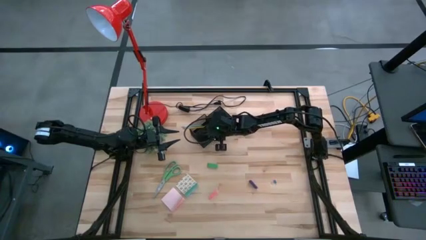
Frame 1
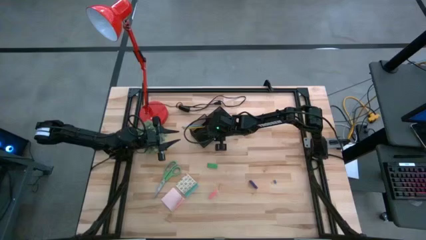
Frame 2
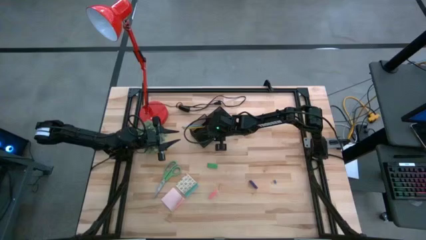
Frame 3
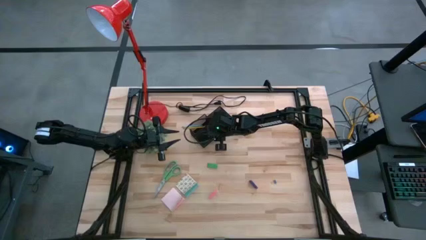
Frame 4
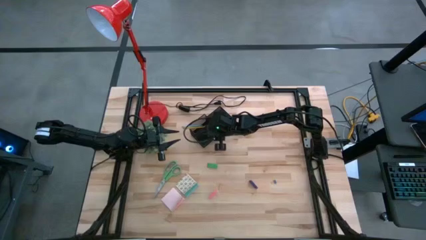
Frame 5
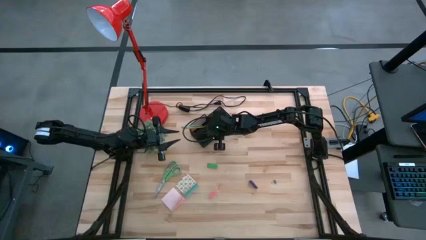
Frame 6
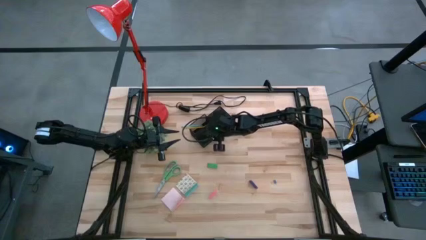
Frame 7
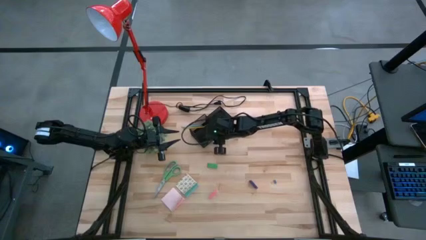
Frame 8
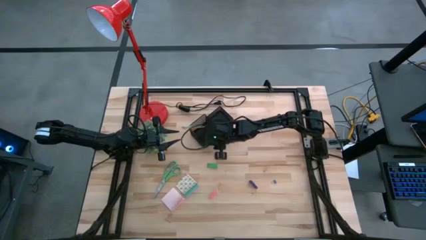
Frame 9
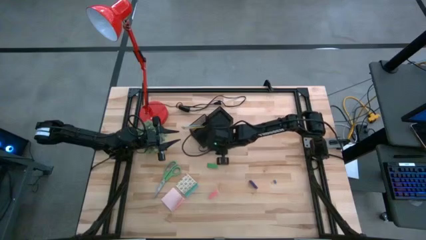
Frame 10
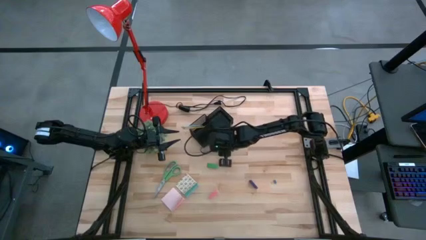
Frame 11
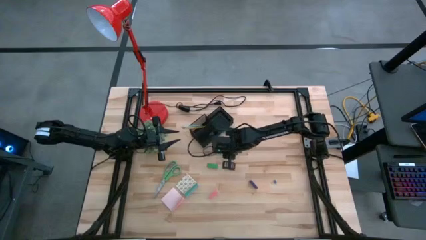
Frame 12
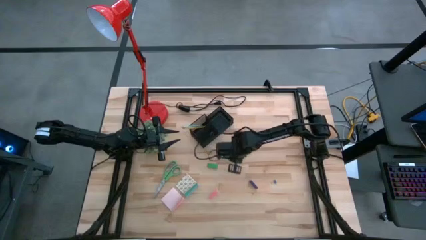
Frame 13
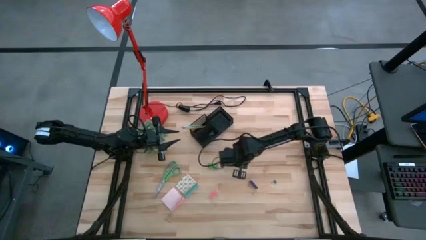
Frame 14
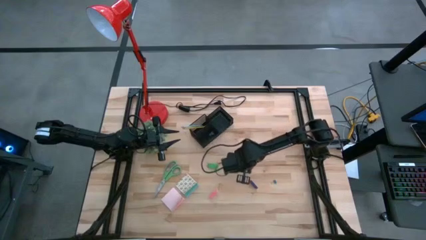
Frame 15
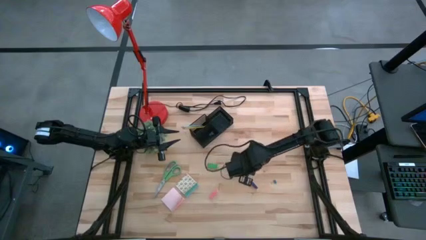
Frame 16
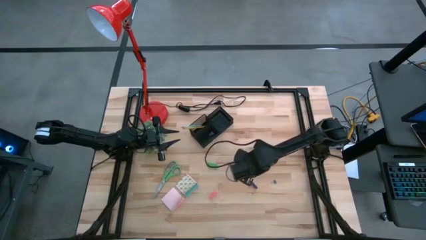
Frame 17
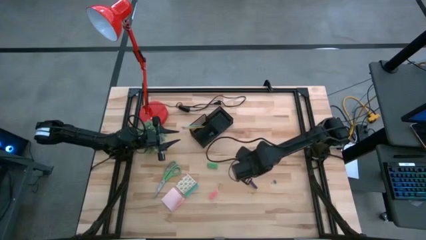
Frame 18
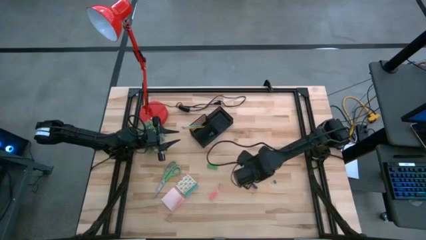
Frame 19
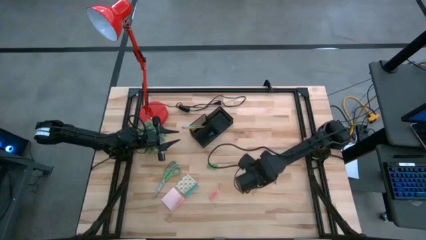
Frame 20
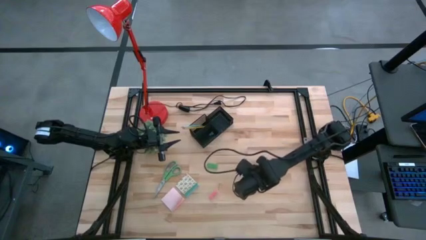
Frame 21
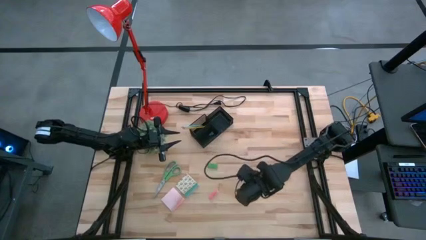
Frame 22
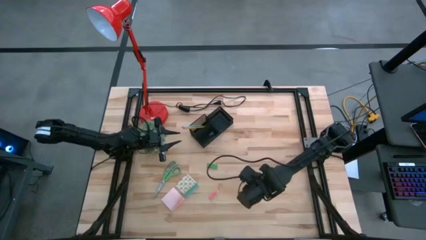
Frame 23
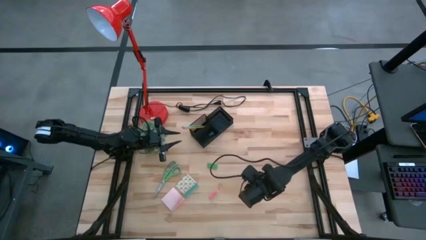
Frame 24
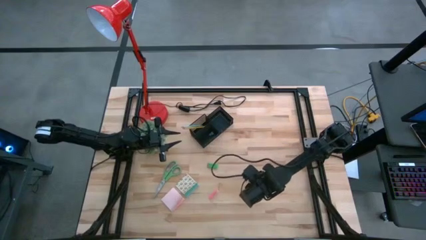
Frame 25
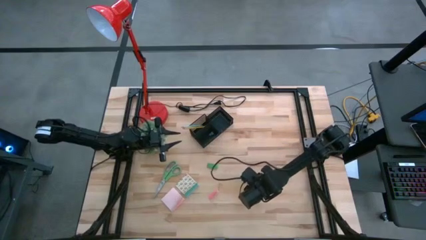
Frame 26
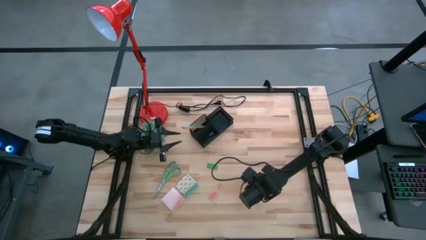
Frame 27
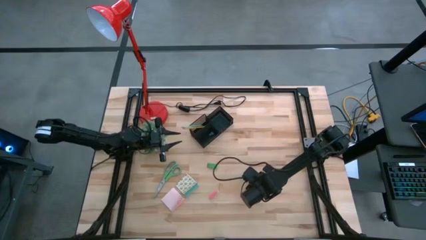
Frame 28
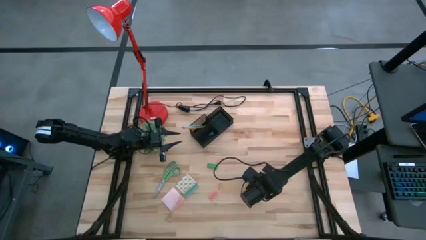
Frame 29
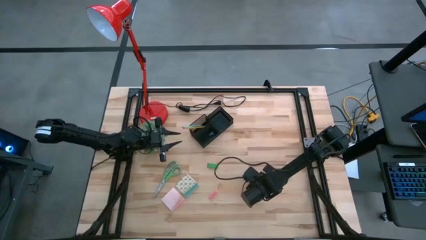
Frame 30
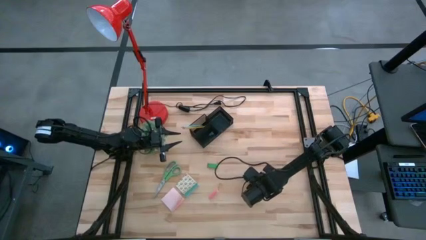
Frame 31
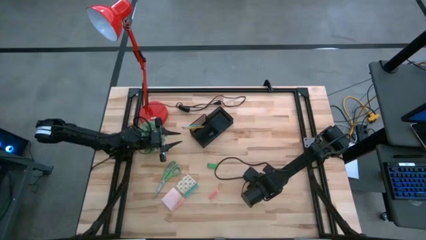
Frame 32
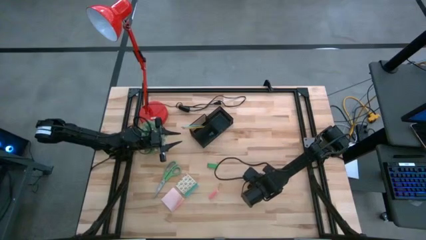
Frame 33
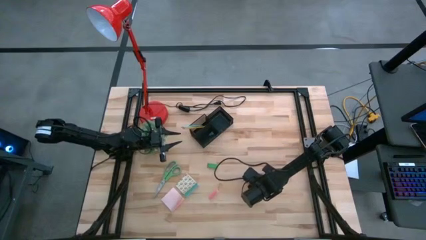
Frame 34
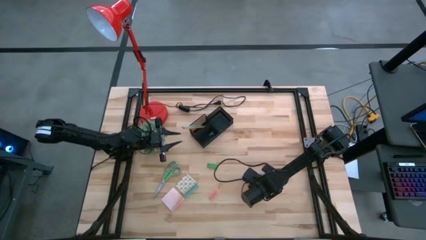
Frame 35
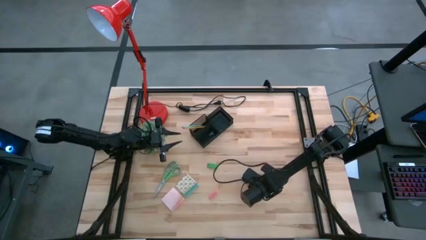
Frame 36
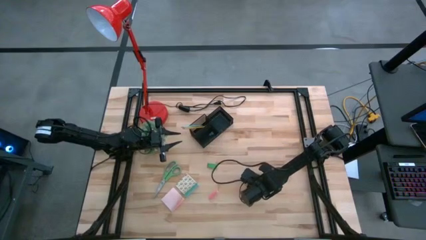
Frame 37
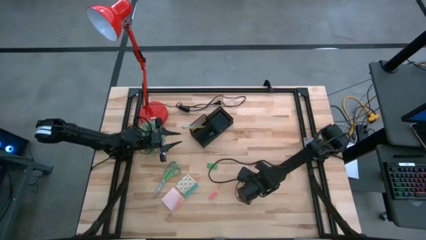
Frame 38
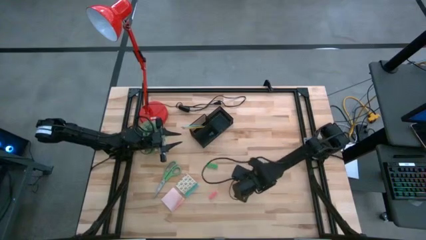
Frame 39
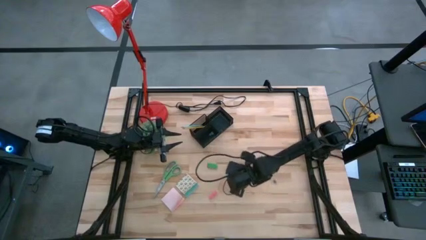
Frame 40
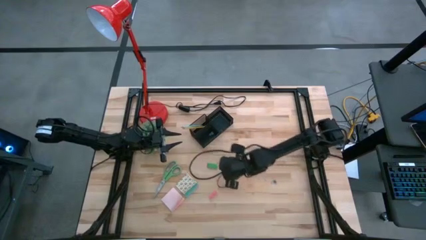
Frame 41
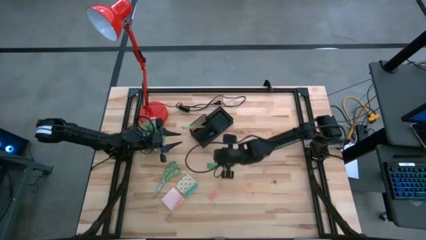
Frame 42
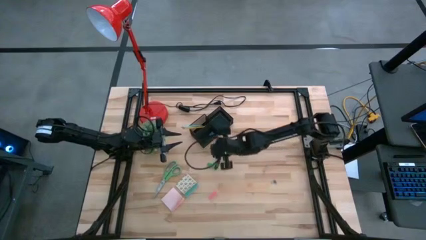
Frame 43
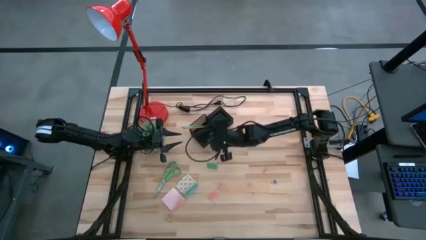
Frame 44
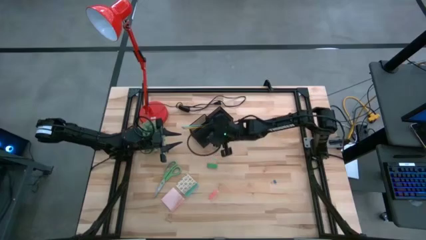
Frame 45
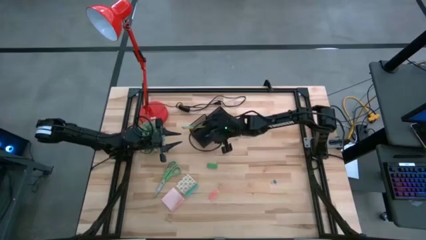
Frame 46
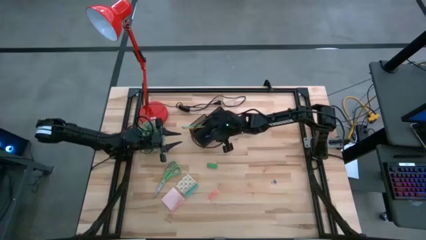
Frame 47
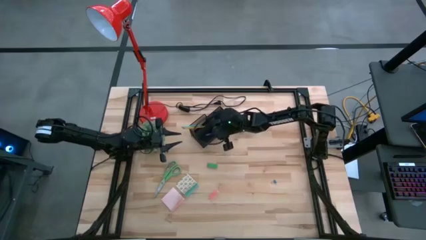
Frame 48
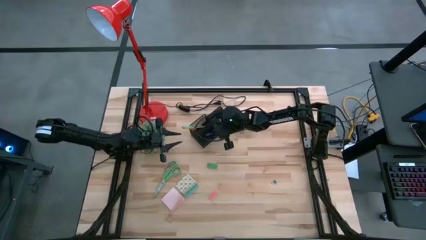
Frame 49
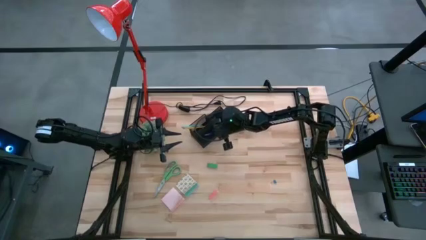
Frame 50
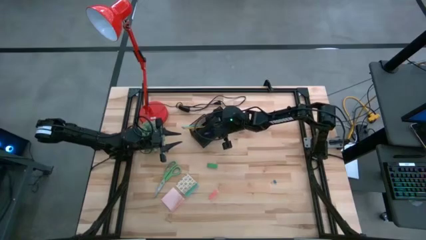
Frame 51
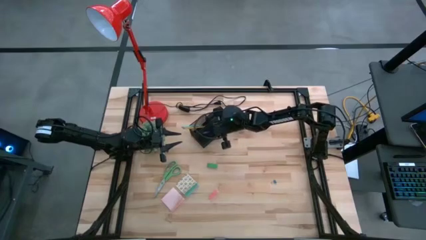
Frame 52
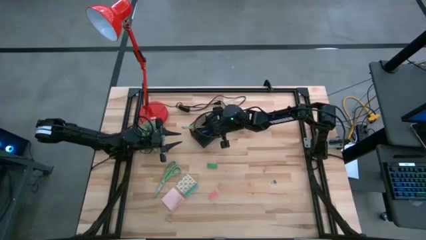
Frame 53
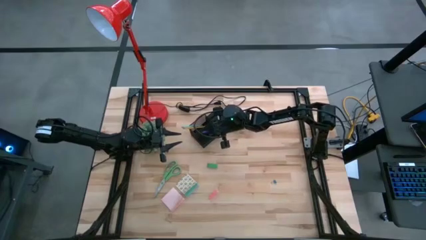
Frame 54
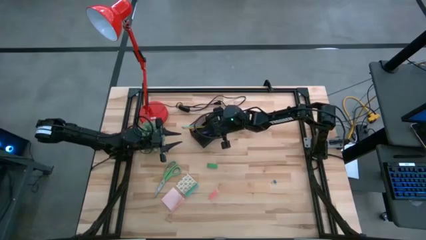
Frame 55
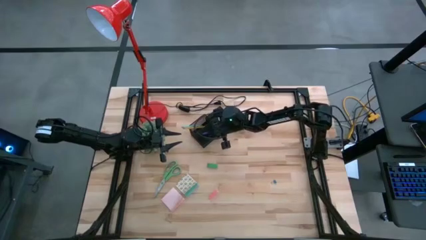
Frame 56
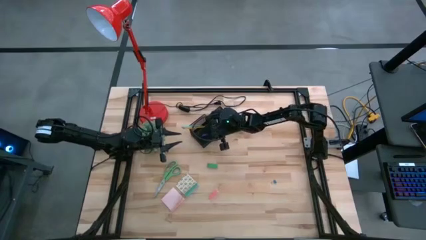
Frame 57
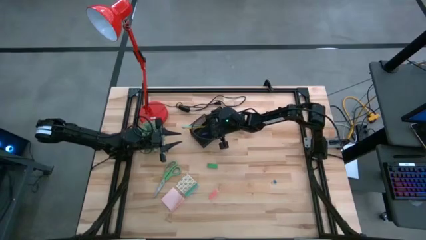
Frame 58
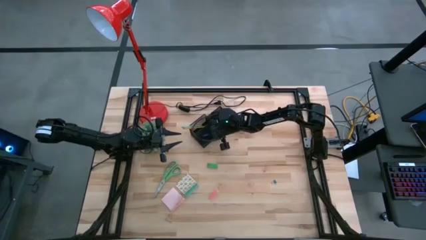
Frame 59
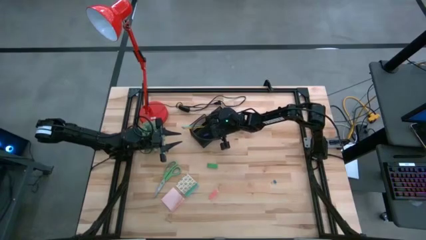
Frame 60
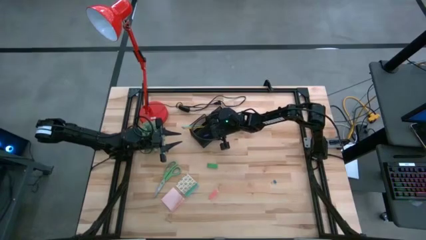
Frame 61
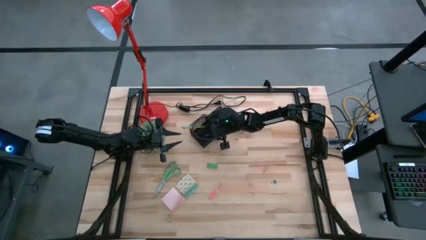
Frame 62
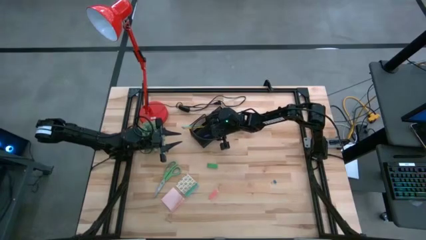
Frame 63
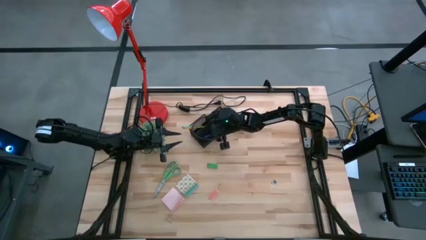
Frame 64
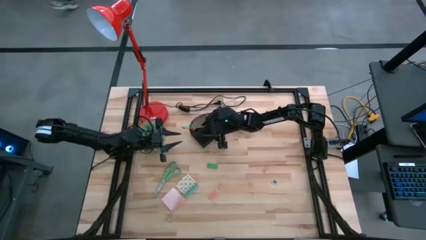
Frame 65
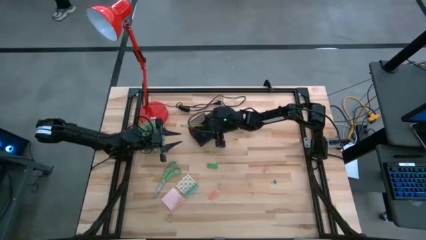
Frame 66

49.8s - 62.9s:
Task: Pick and place office supplies into organizer
Put the blue eraser into the black desk organizer
